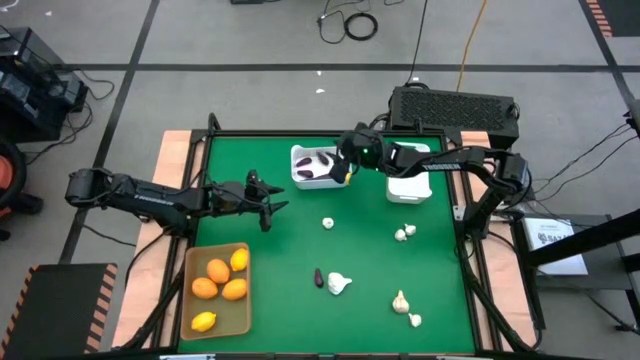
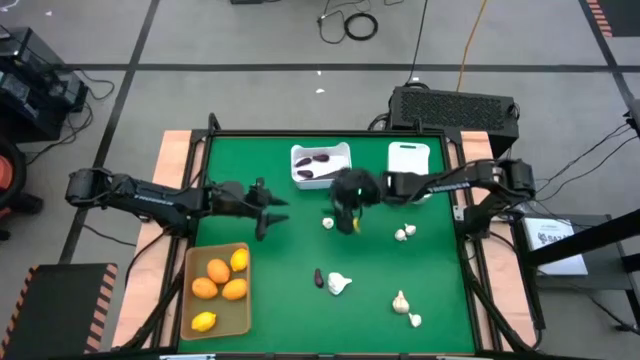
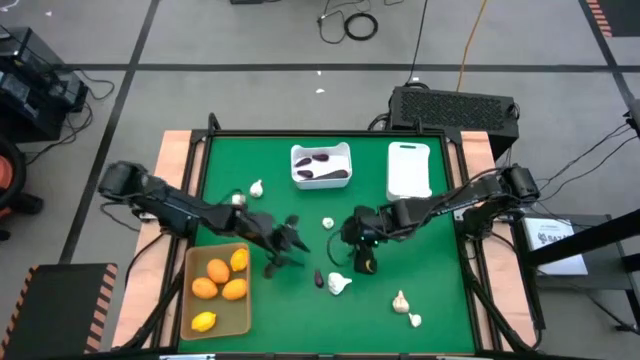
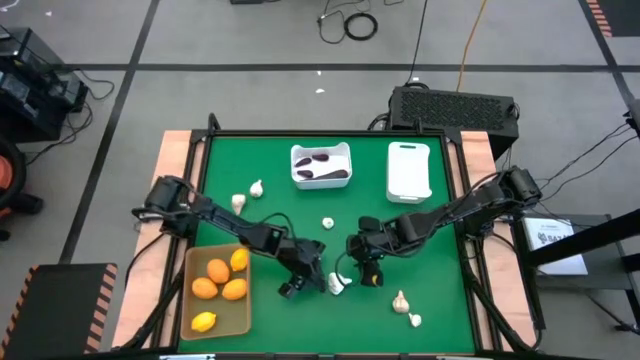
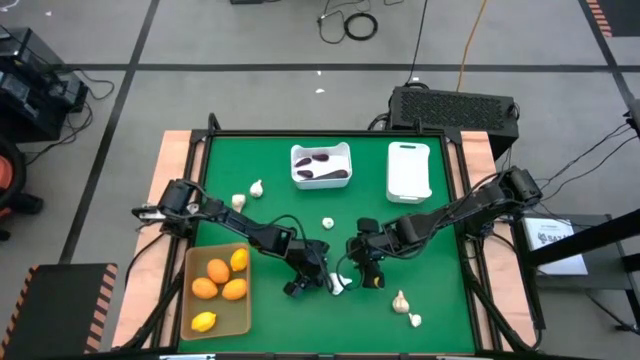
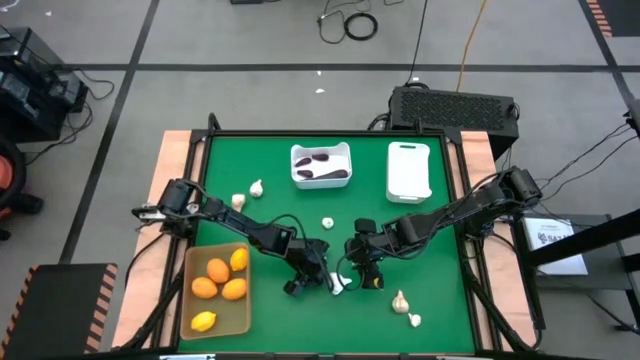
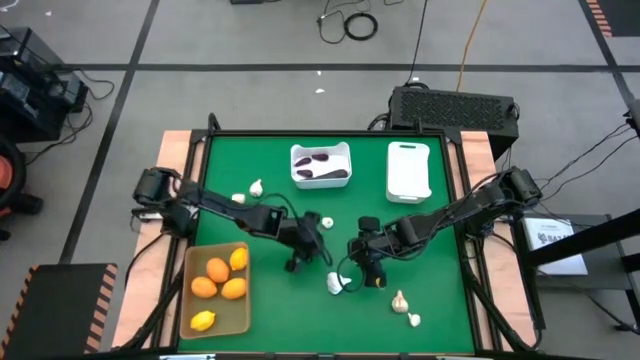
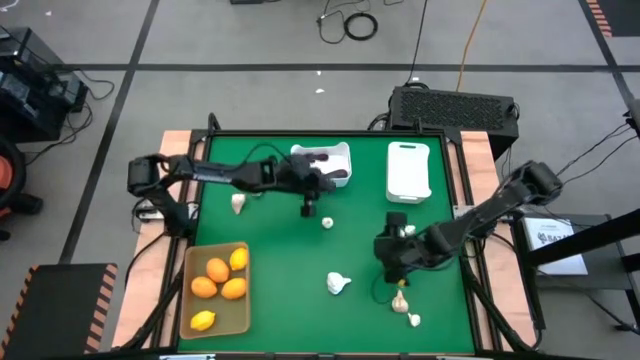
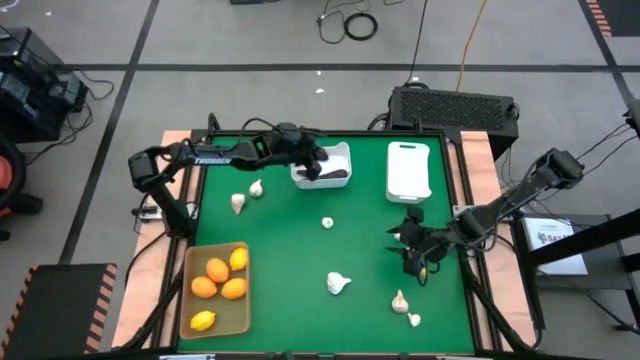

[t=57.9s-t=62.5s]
Task: Sort produce into baskets
Put the violet eggplant into the left white bin

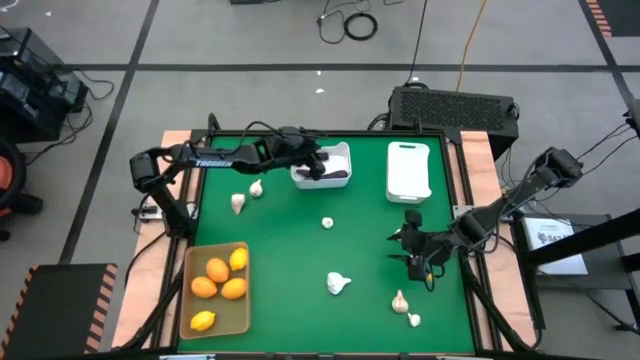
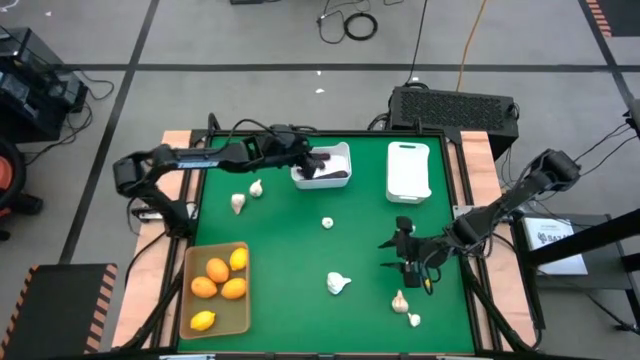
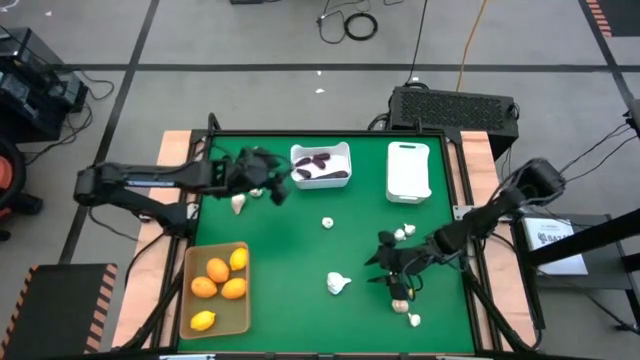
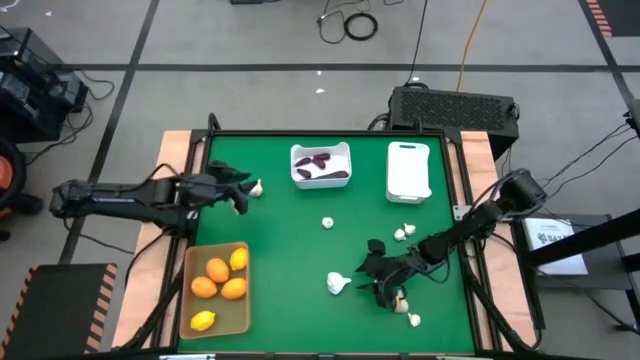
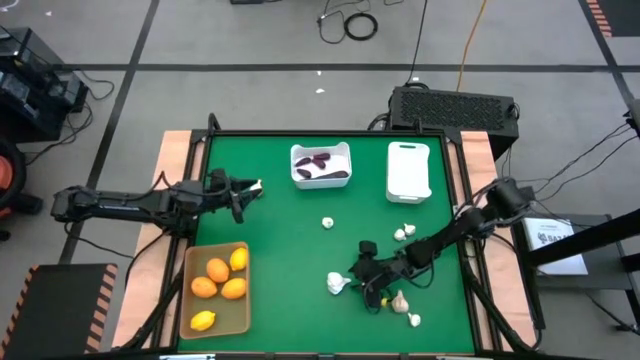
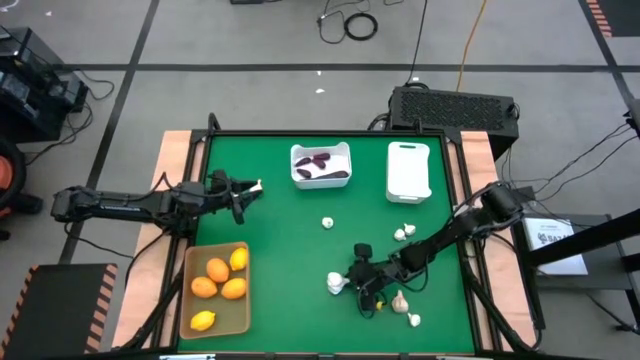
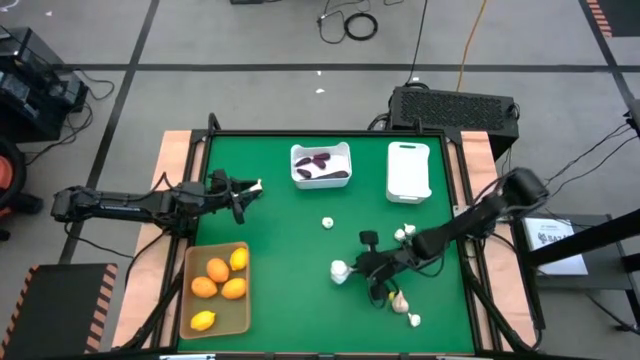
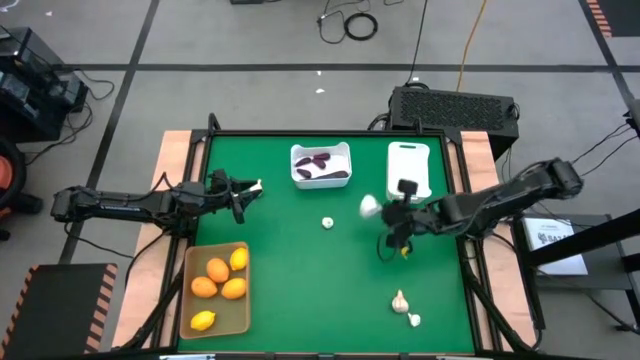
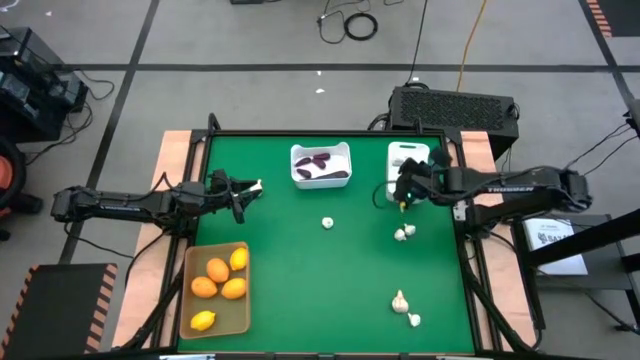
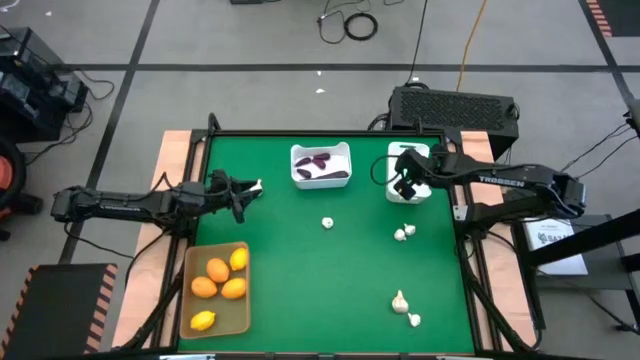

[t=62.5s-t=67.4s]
Put the white garlic into the right white bin

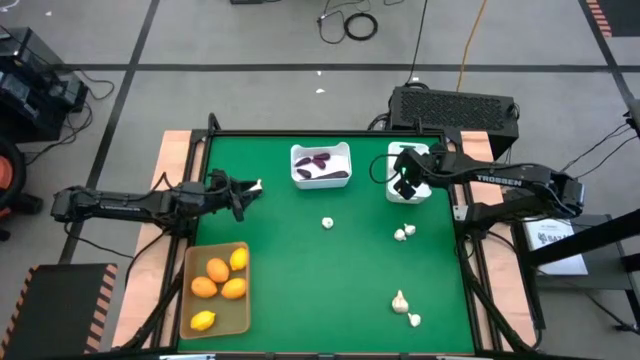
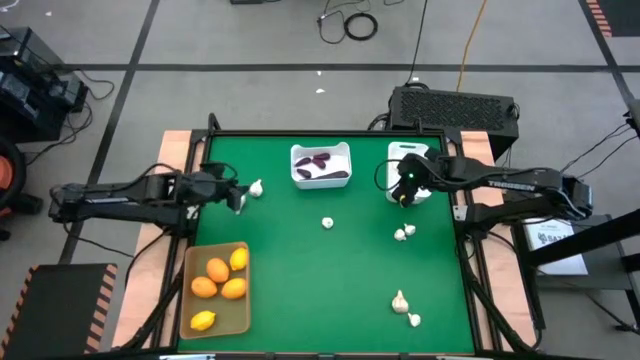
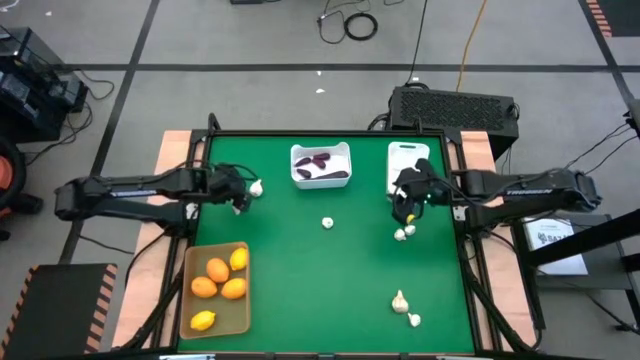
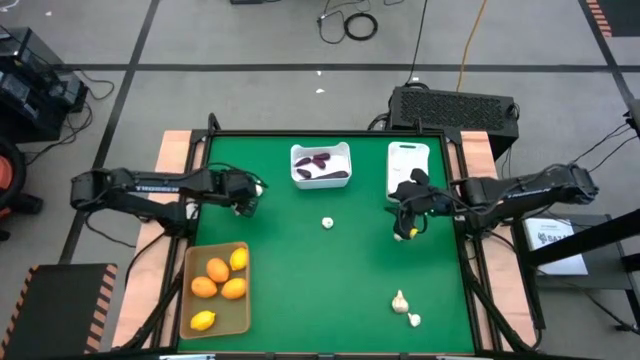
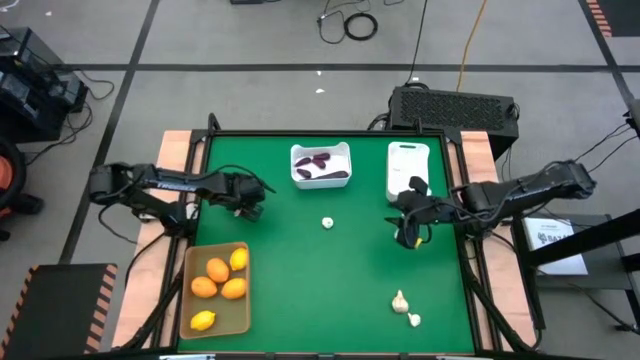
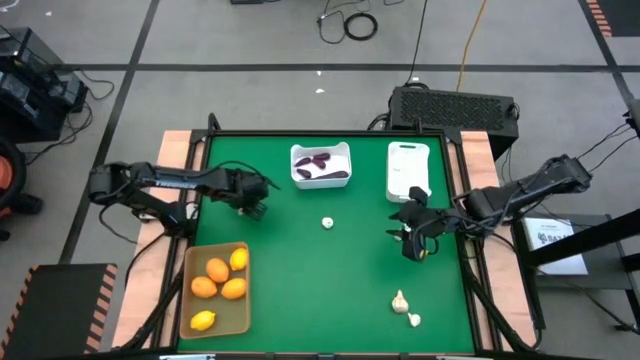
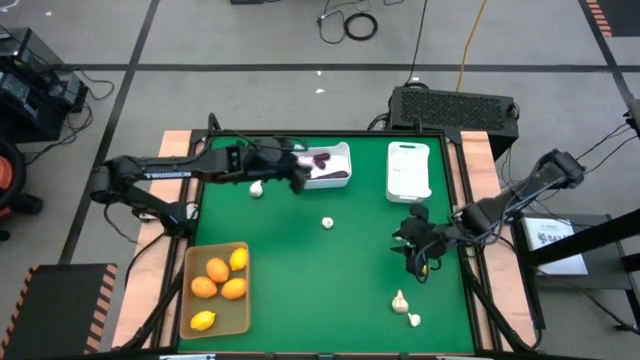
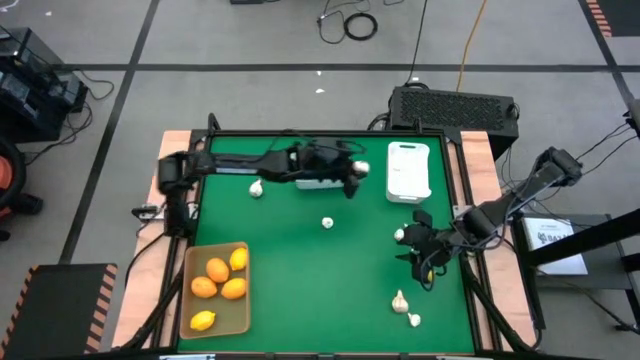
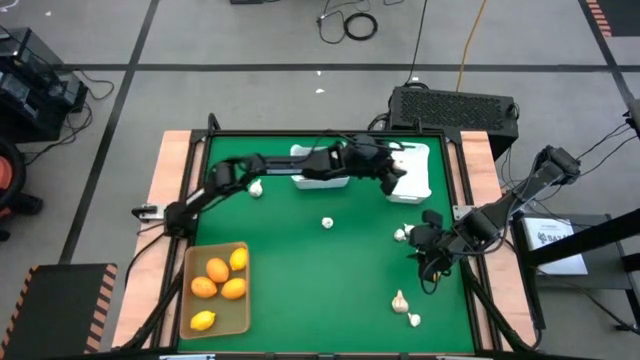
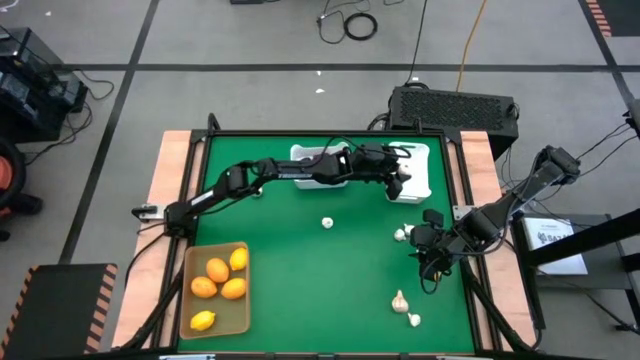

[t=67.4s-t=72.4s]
Put the white garlic into the right white bin

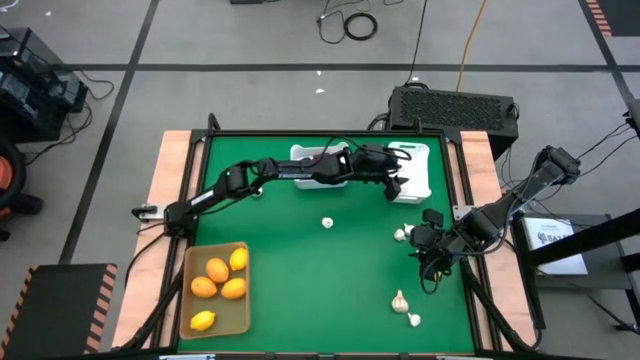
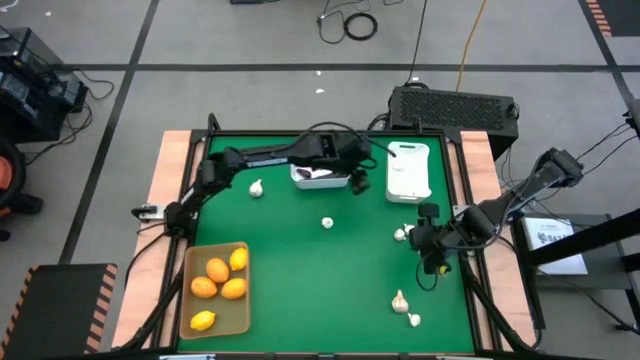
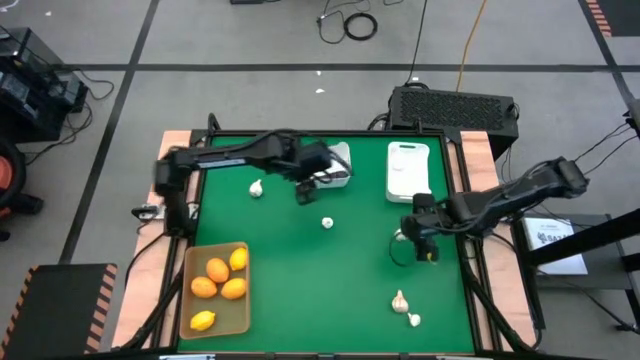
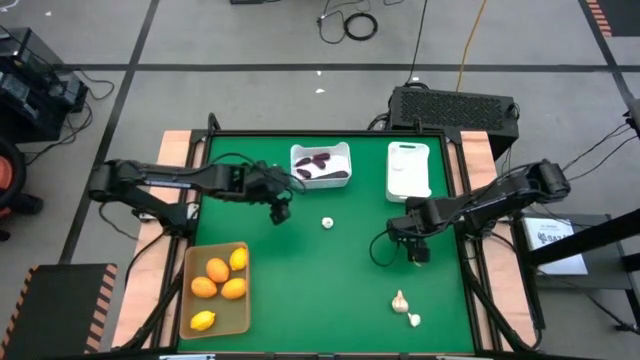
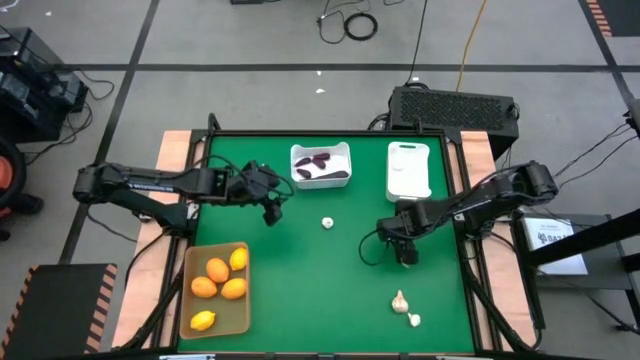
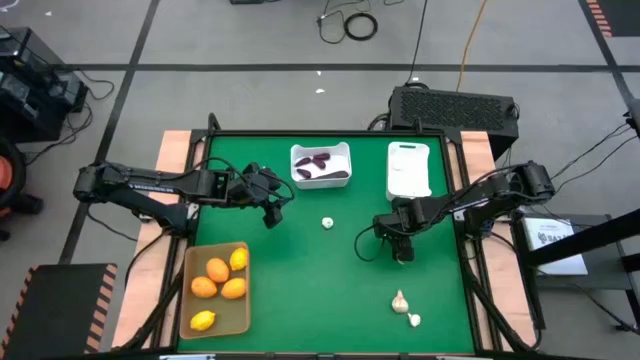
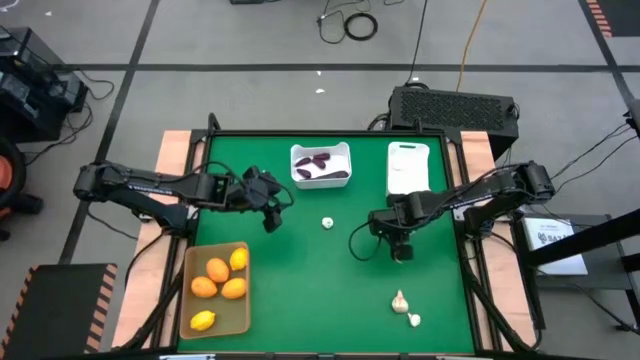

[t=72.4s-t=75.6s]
Put the white garlic into the right white bin

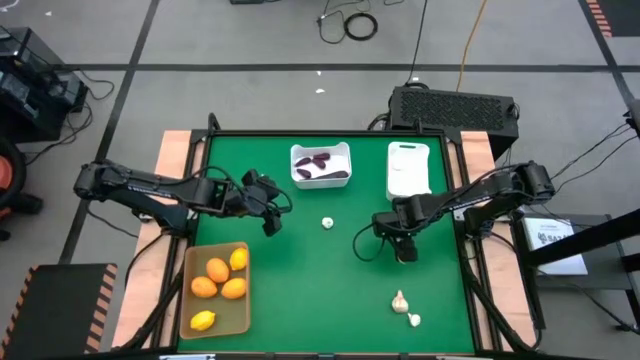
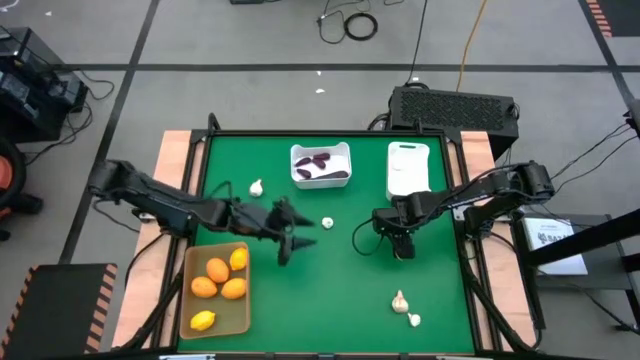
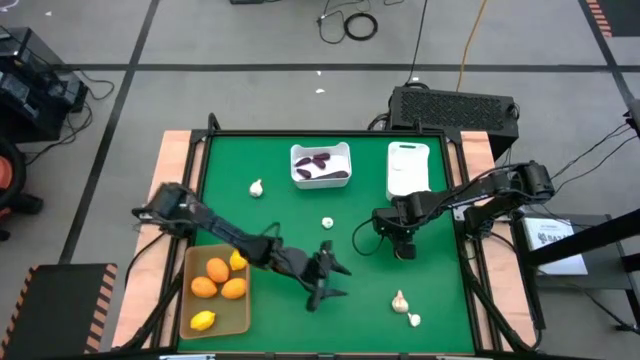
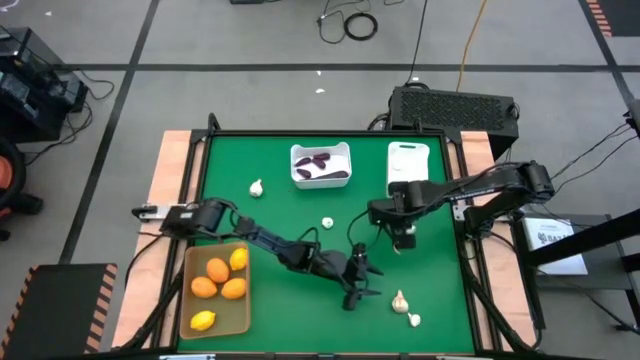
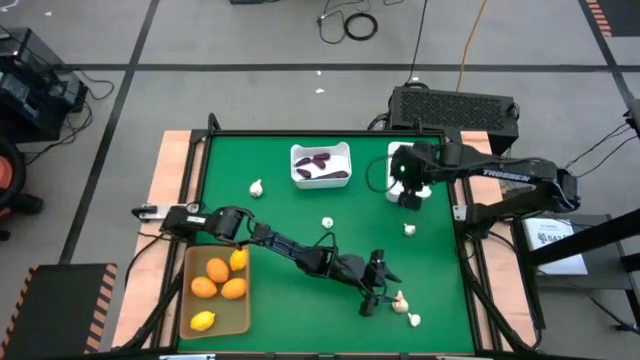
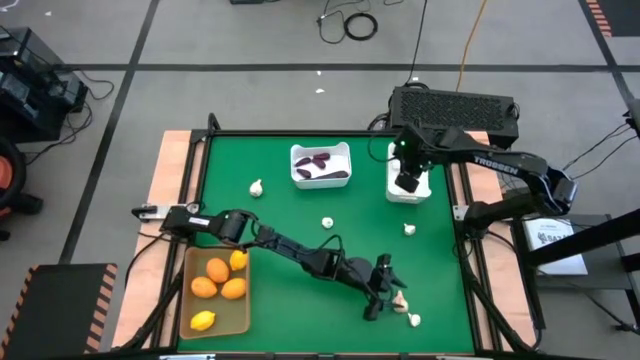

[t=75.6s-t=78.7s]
Put the white garlic into the right white bin
